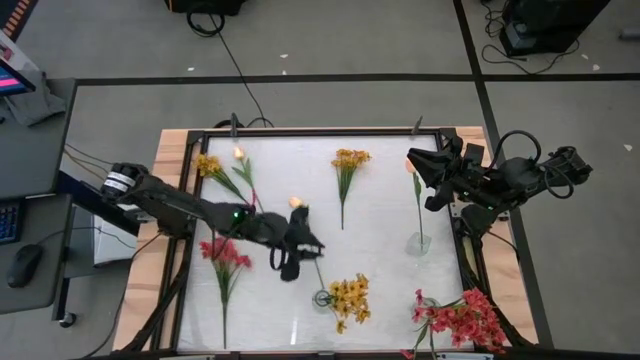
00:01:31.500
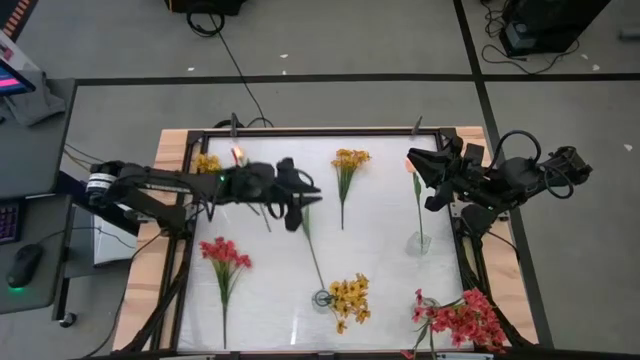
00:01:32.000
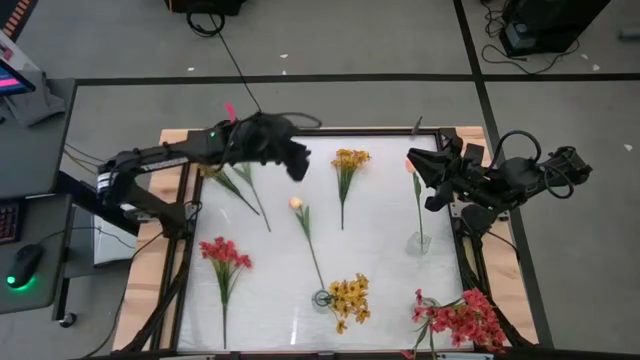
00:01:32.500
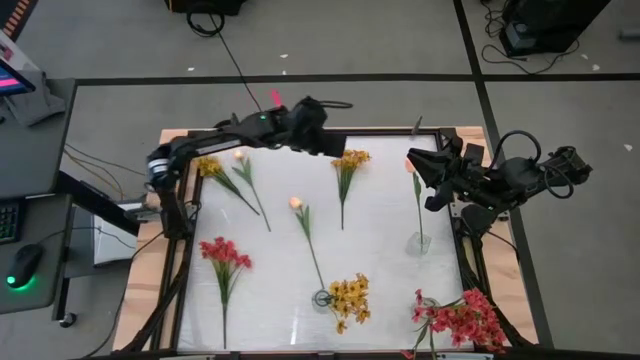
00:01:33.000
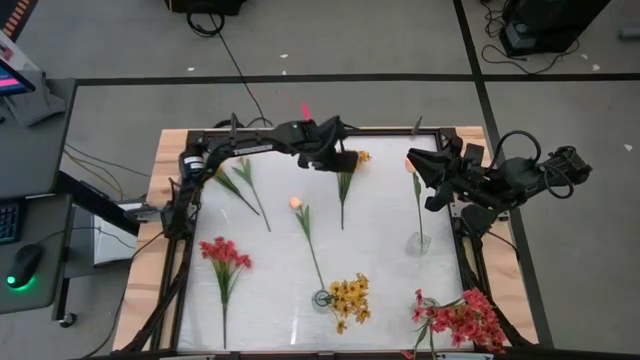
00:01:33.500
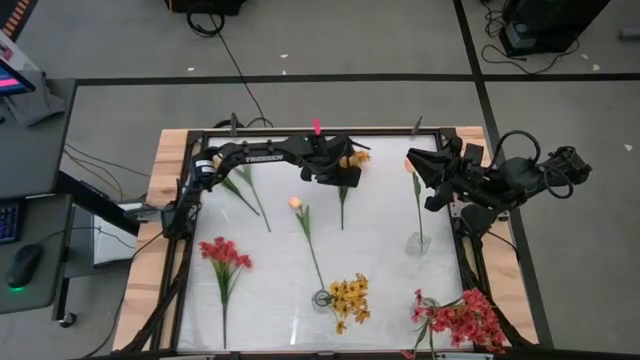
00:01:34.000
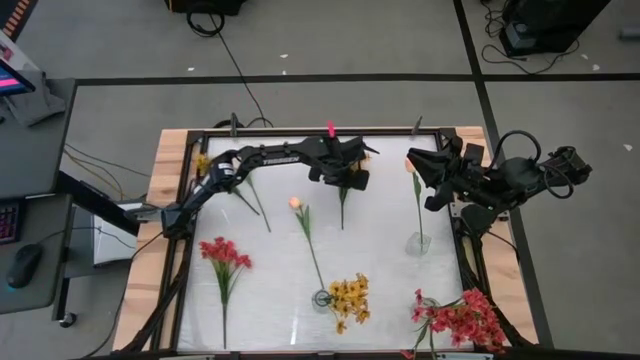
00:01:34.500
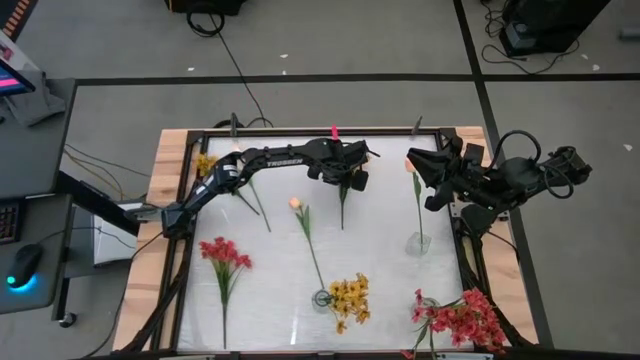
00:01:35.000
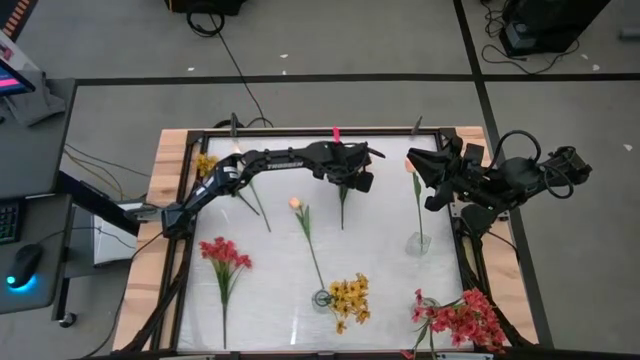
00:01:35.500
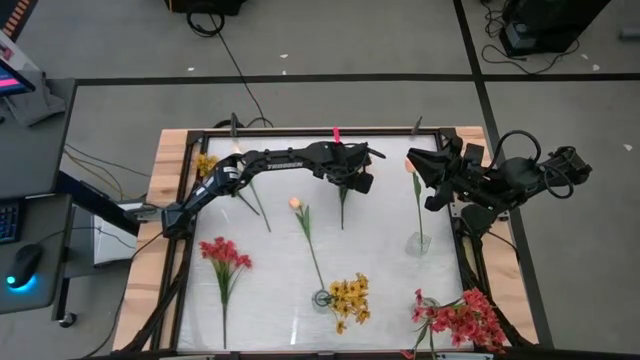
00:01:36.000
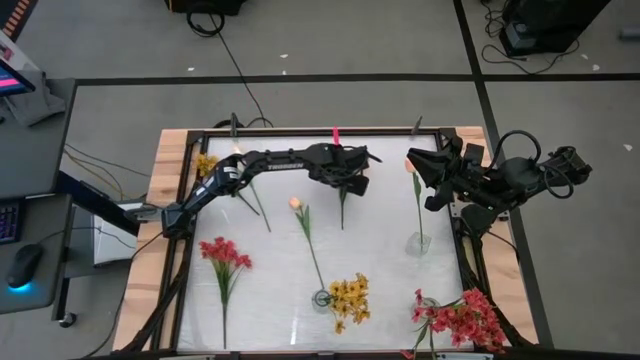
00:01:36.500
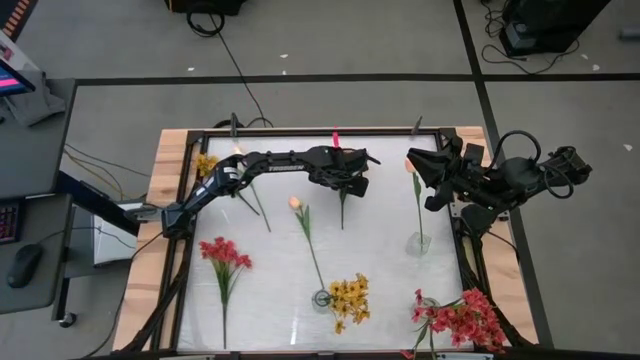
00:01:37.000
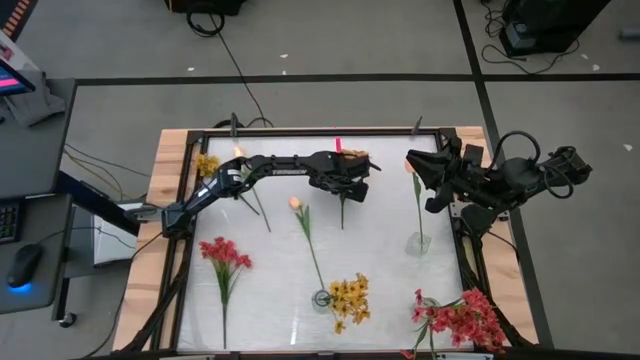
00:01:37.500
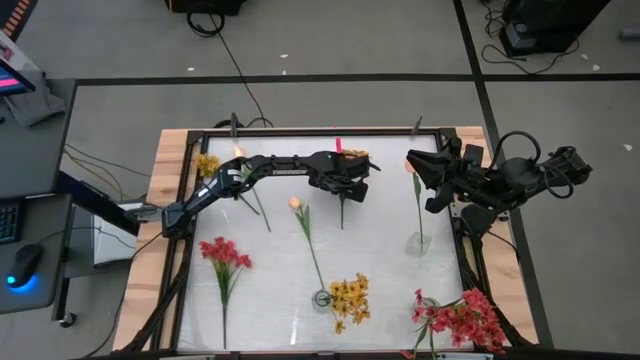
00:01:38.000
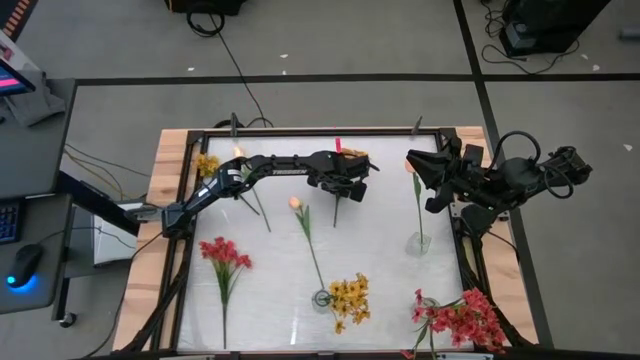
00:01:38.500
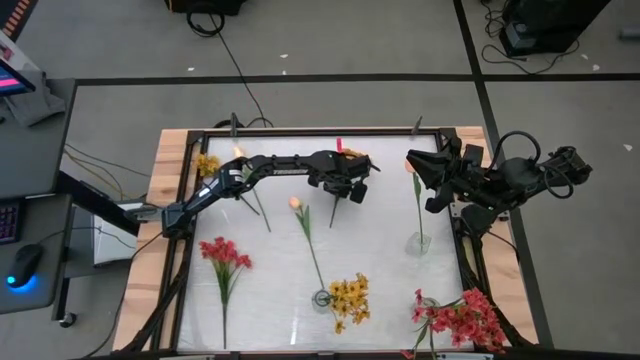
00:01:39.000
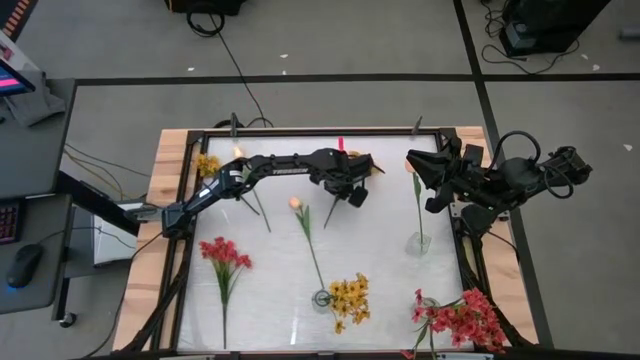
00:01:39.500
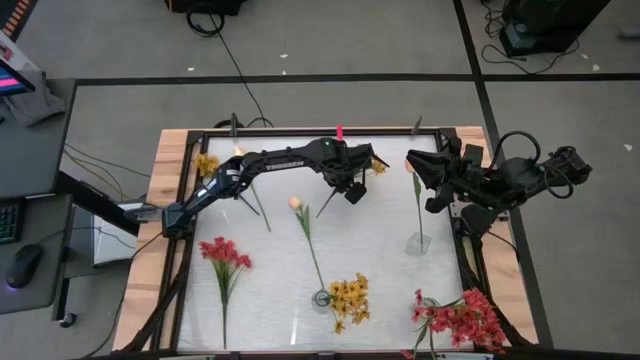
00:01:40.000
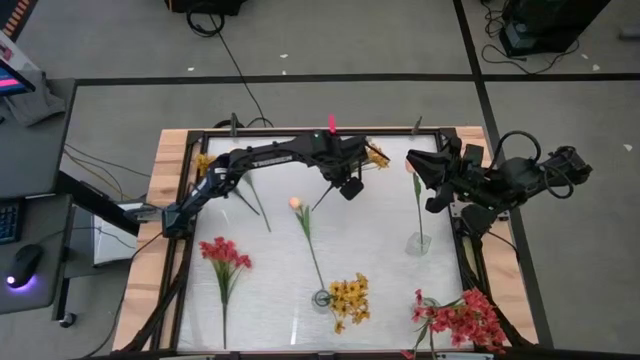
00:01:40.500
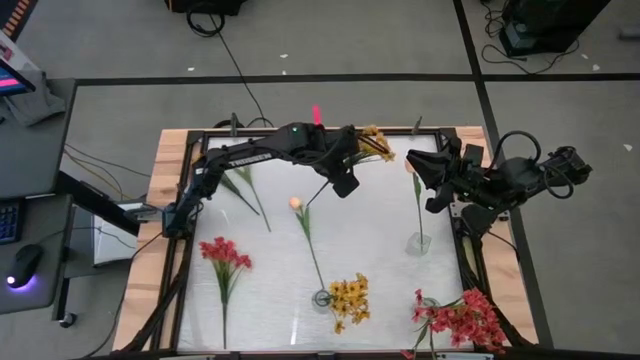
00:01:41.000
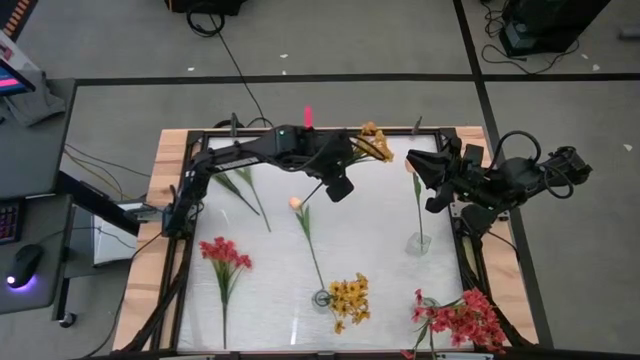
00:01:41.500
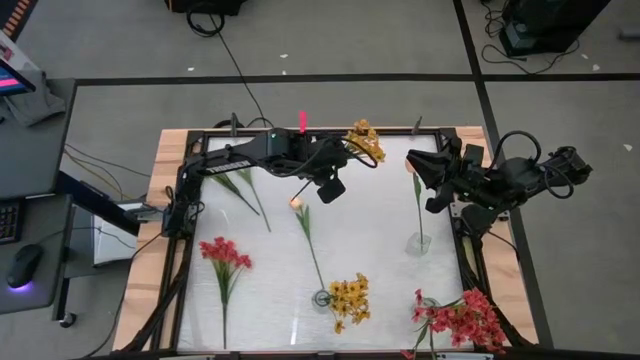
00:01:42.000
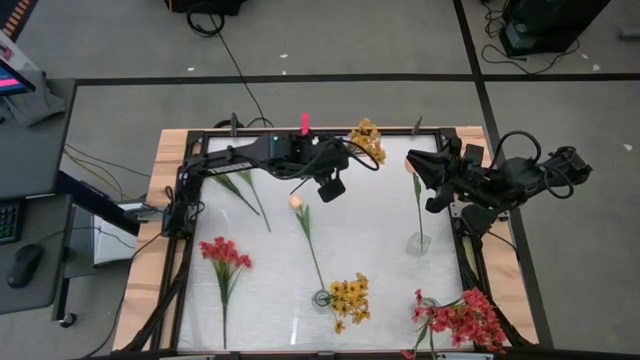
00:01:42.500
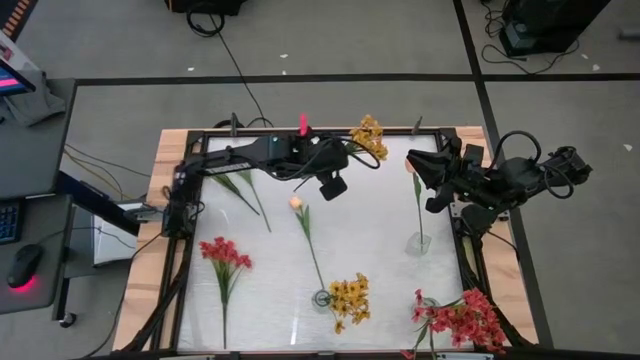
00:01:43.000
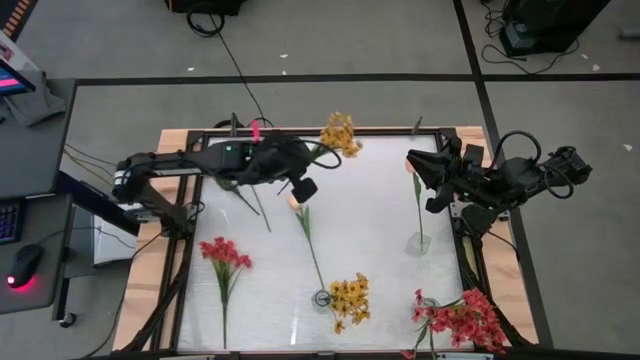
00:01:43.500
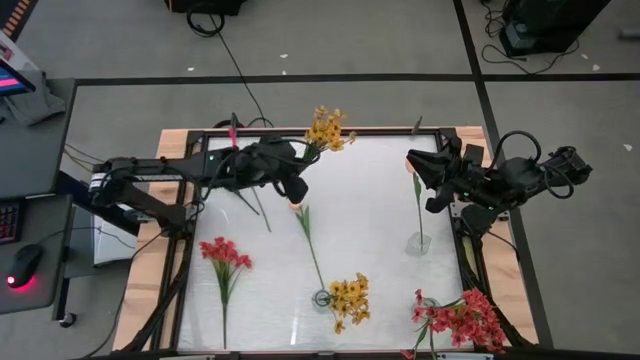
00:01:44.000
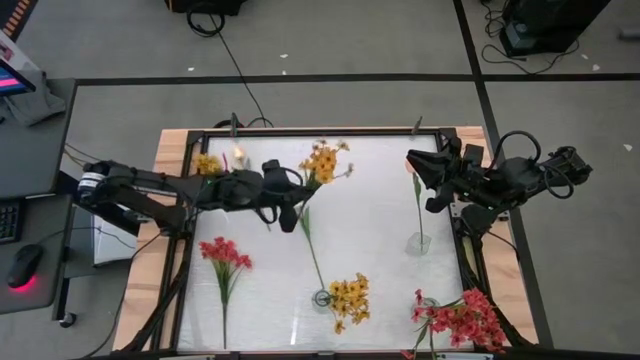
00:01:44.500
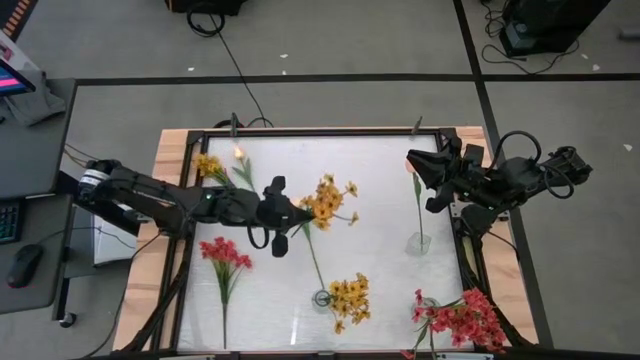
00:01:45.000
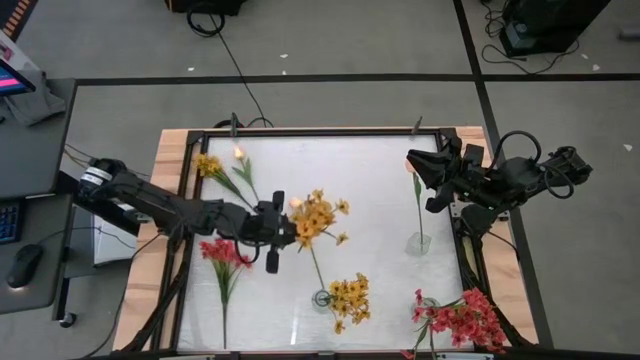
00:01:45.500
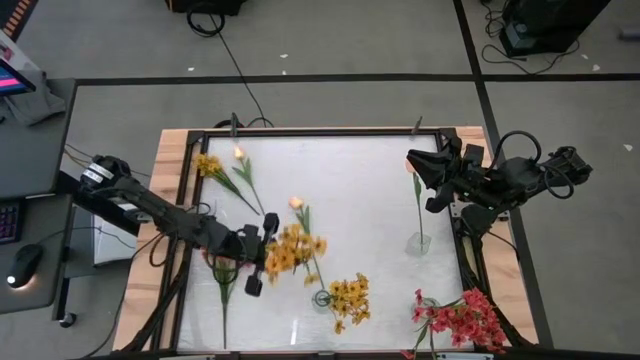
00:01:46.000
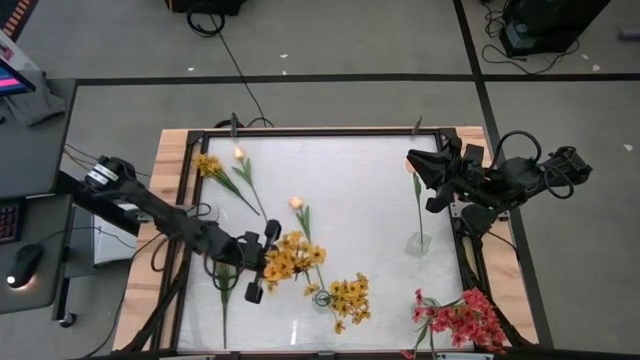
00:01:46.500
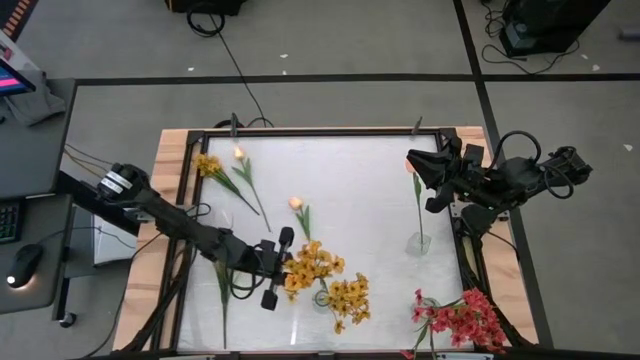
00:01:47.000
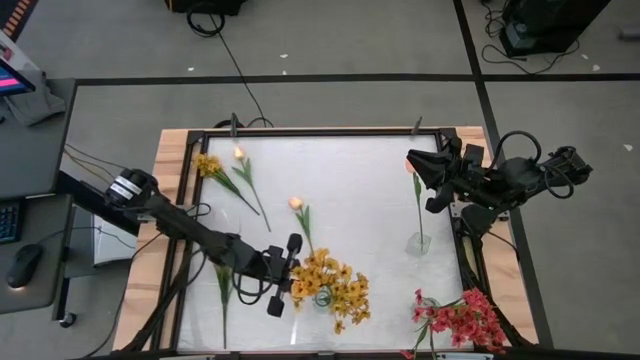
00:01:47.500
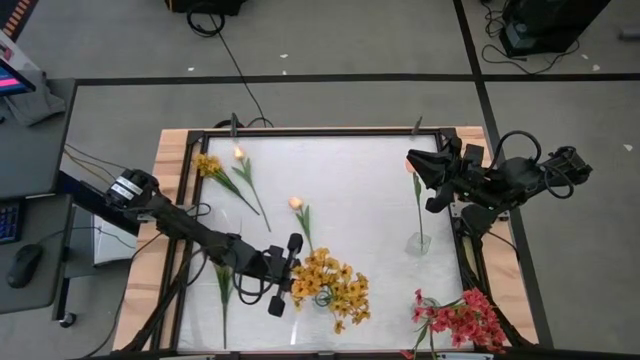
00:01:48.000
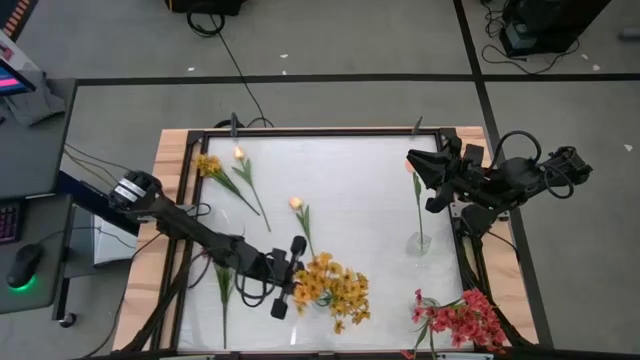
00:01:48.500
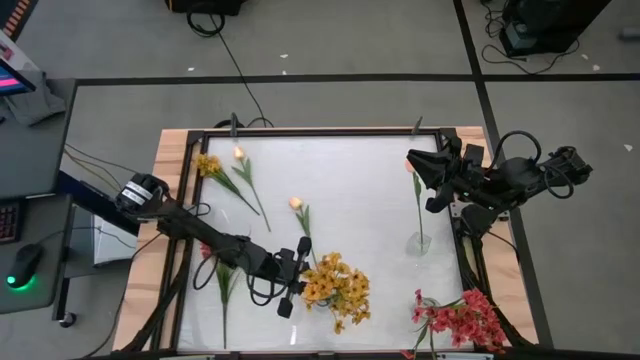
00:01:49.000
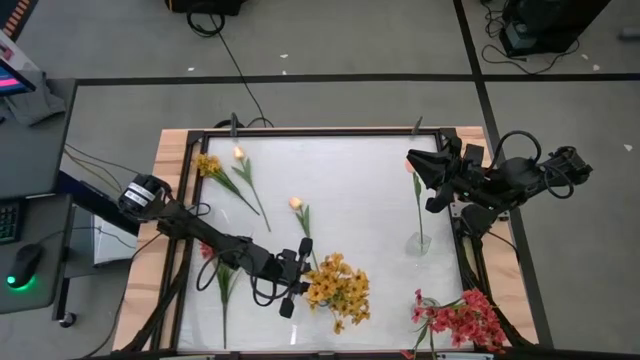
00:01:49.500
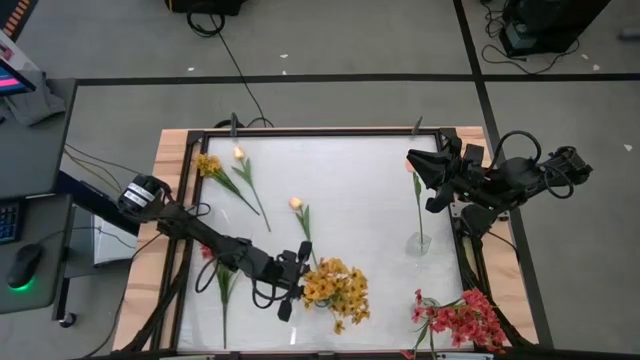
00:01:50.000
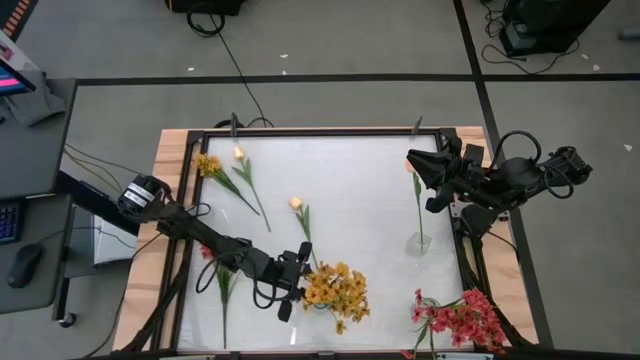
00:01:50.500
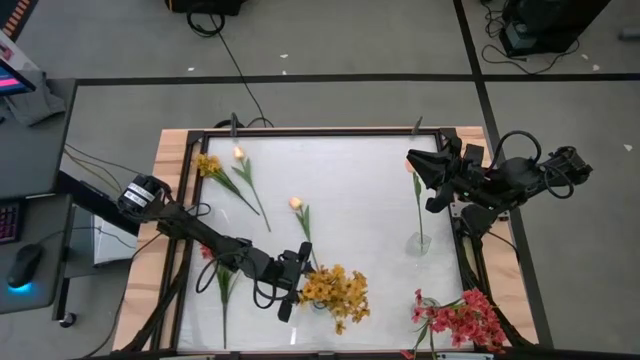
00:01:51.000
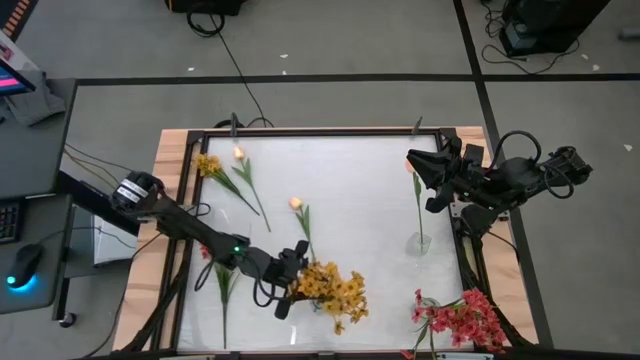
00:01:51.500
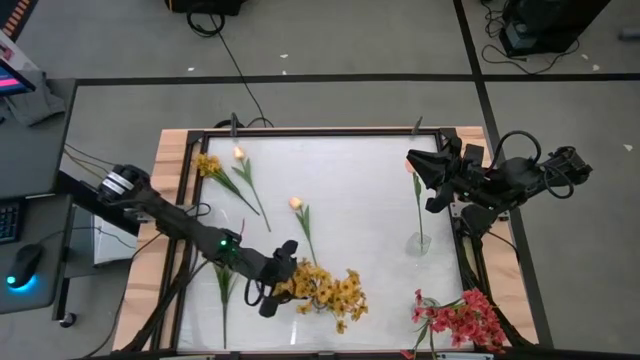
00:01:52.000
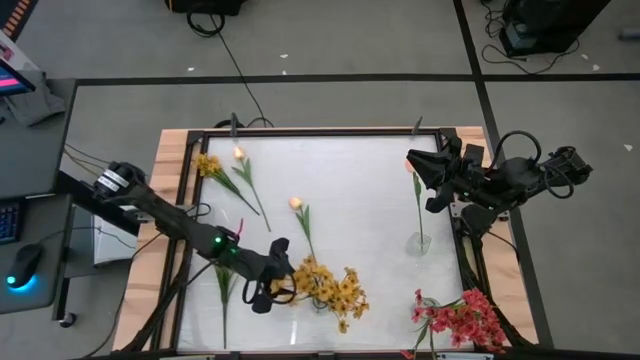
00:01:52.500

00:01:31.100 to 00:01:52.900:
Task: Sort flowers into vase by color
Put the right yellow flowers into the bottom left transparent vase

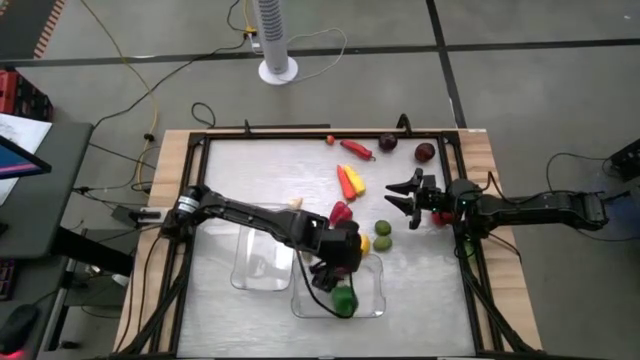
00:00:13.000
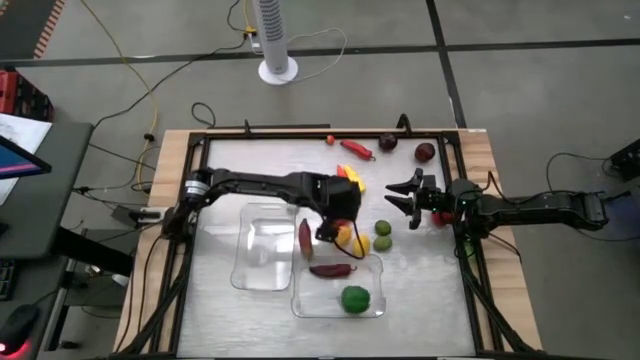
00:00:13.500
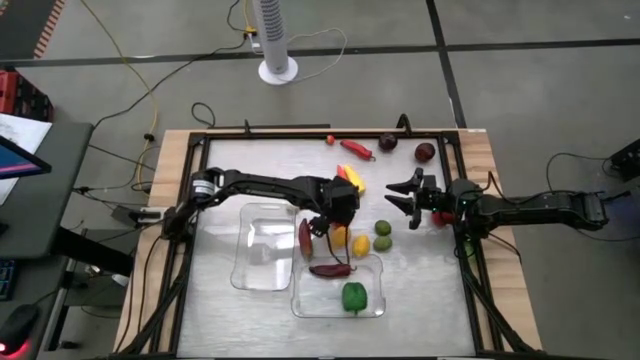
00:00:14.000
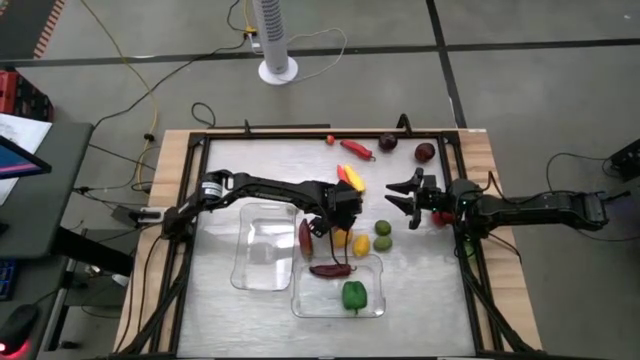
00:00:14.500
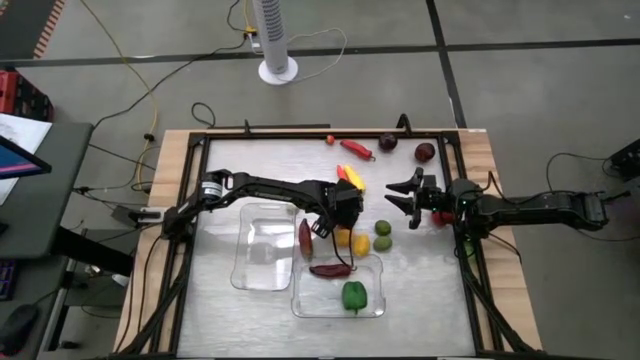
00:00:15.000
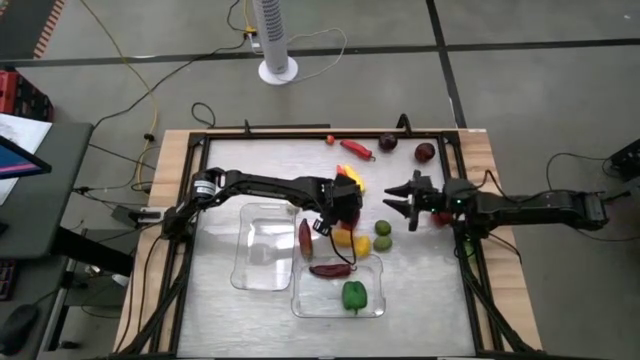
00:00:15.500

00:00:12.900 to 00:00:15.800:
Task: Sort produce into baskets
Put the bottom red bell pepper into the right transparent bin
